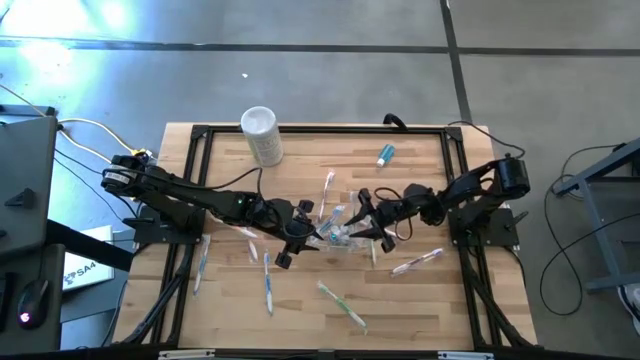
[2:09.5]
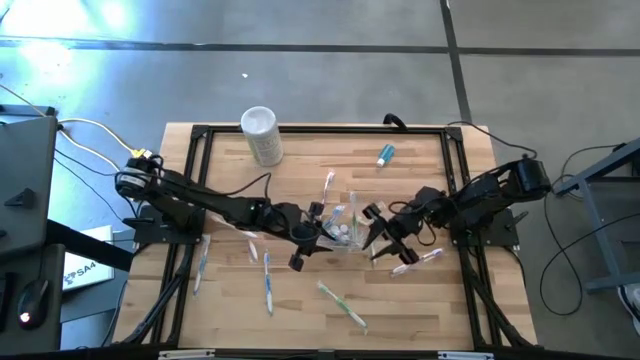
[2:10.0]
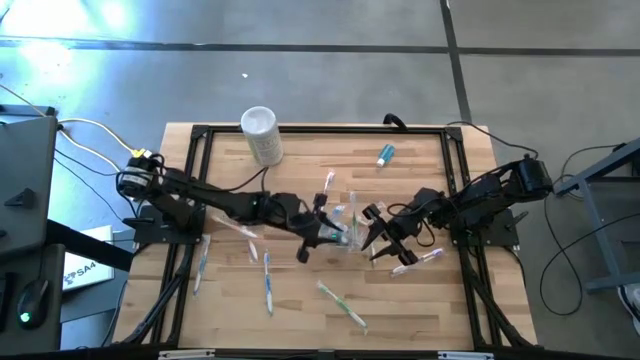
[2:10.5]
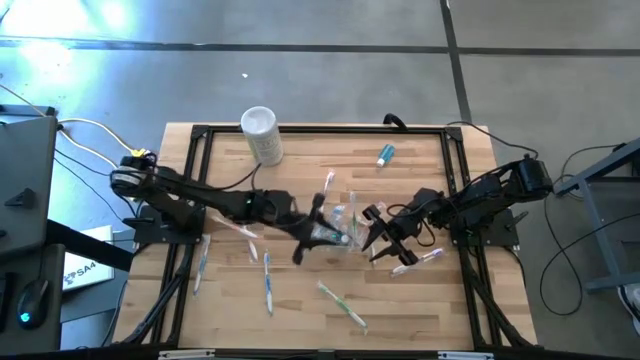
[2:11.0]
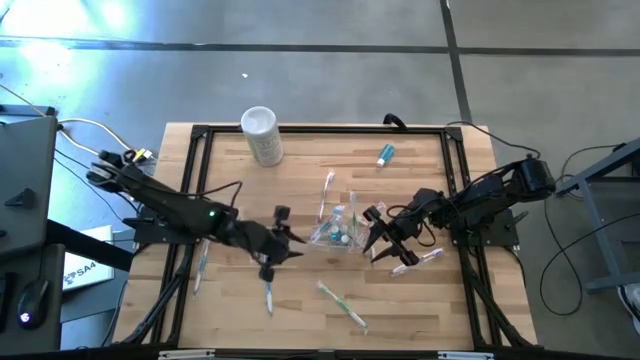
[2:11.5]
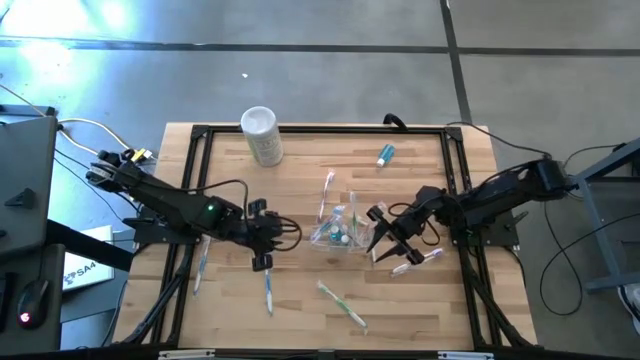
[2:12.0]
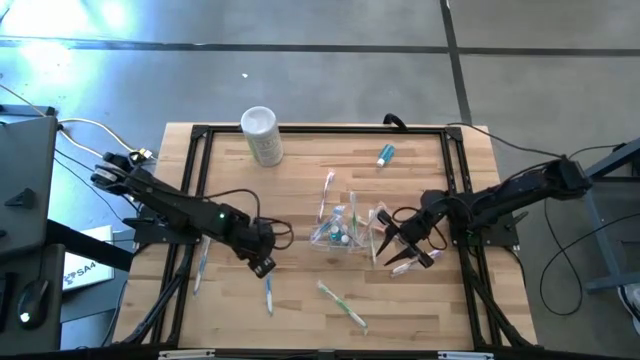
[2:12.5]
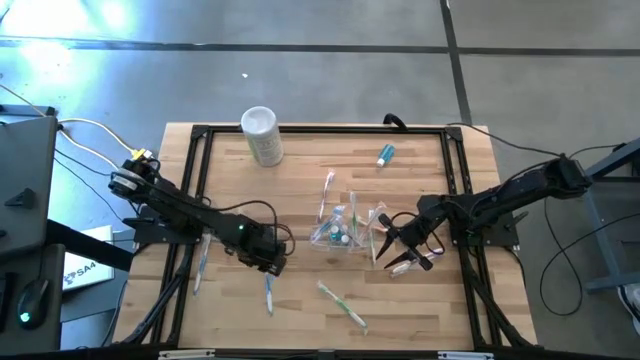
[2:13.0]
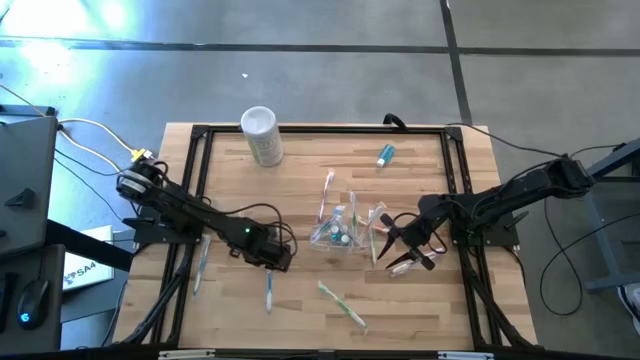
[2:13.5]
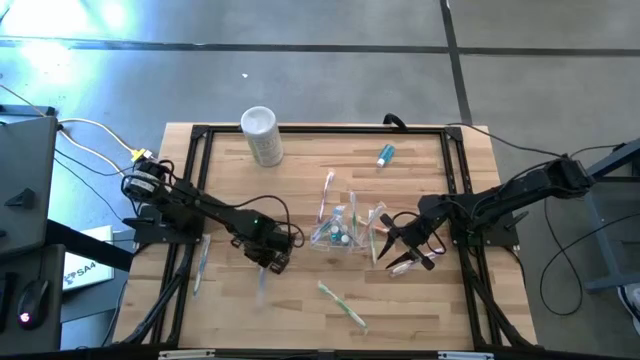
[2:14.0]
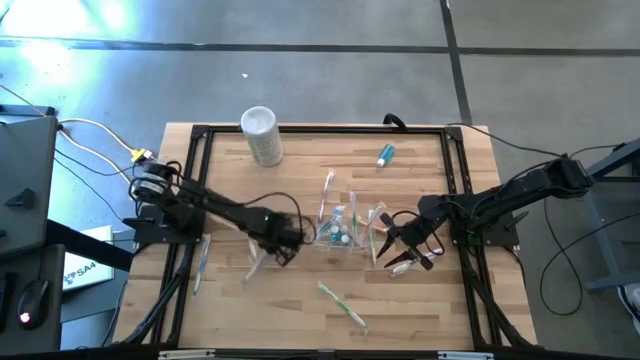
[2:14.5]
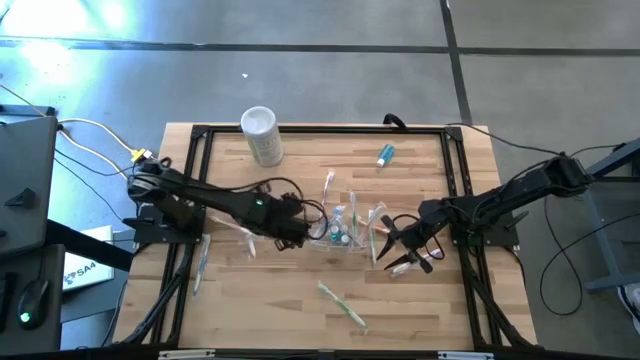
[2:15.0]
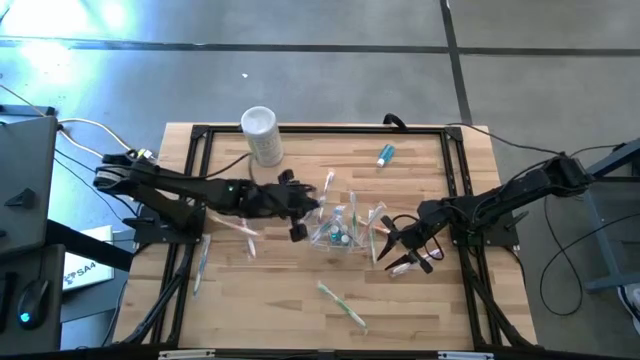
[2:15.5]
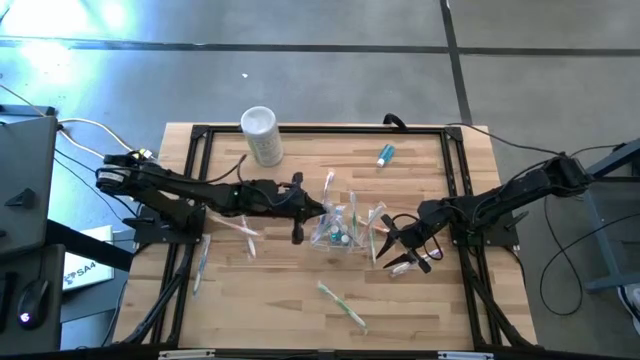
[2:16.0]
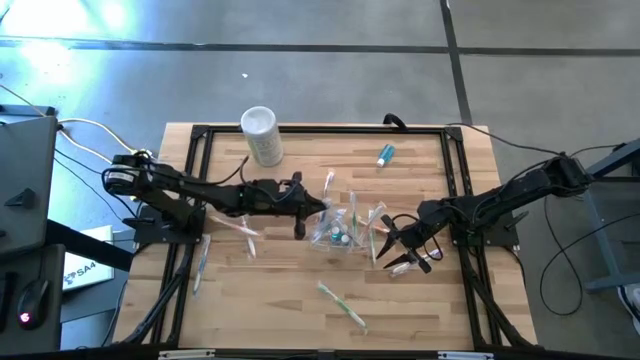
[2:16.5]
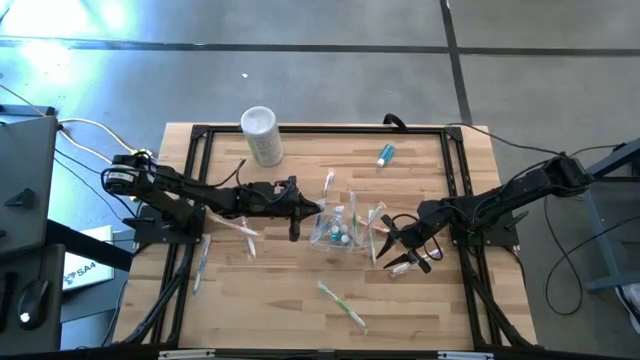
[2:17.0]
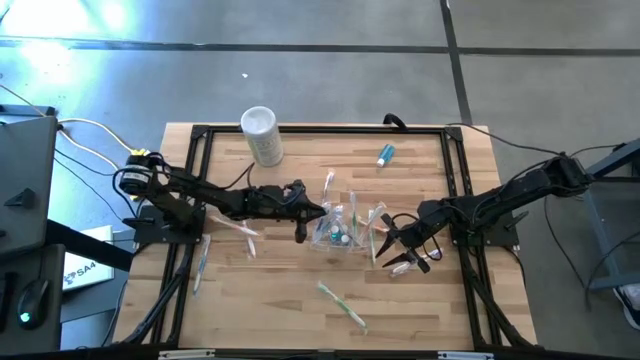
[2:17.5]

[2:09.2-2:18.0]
Task: Pick & Place toothbrushing station
Put the blue toothbrush into the left section of the transparent organizer

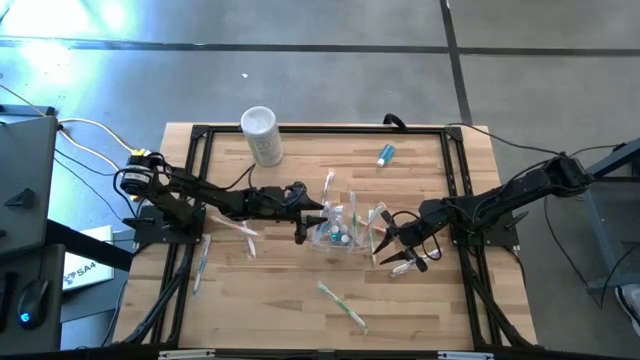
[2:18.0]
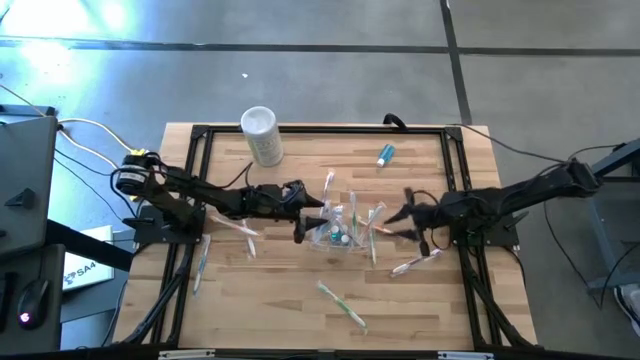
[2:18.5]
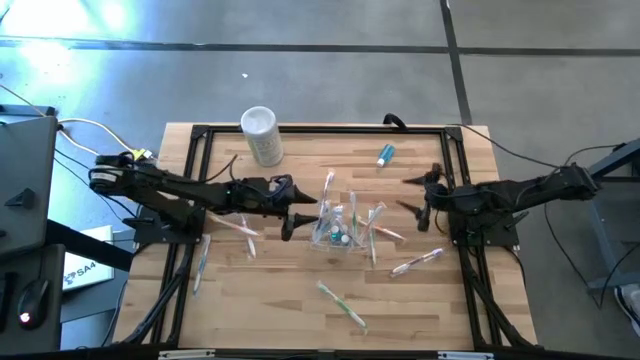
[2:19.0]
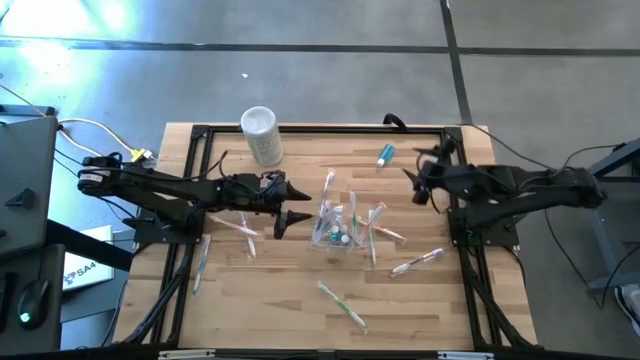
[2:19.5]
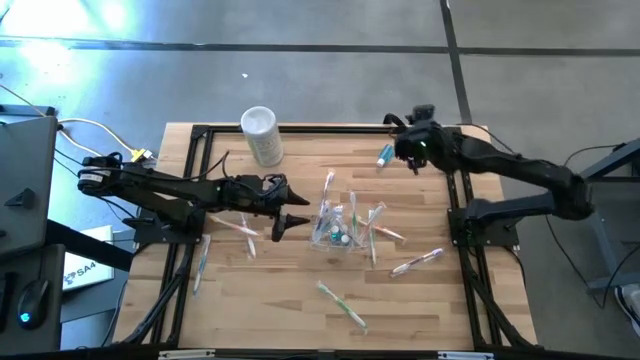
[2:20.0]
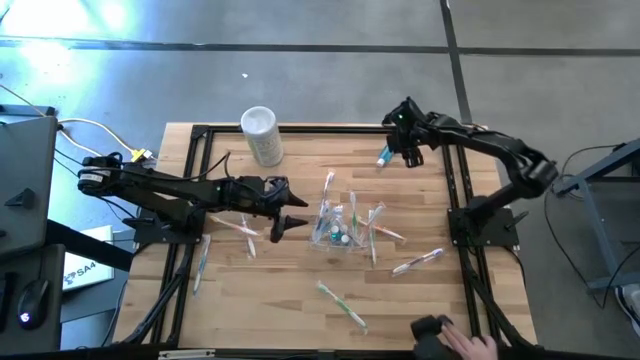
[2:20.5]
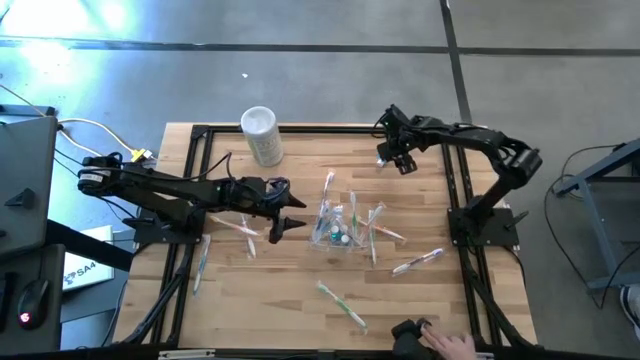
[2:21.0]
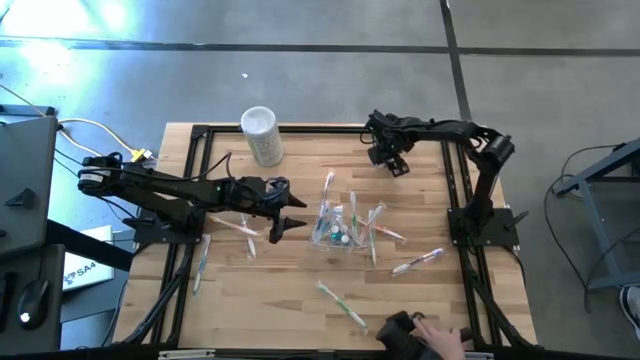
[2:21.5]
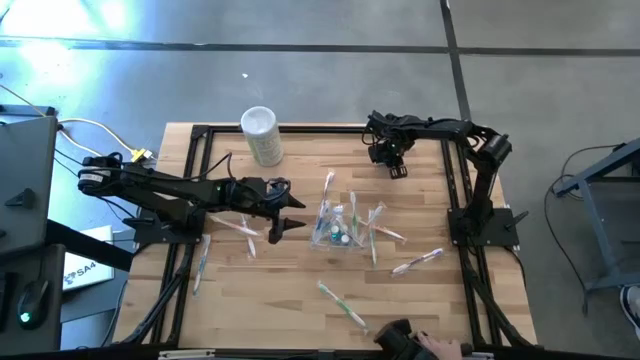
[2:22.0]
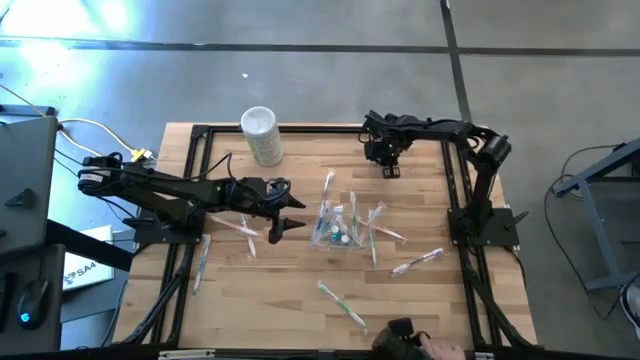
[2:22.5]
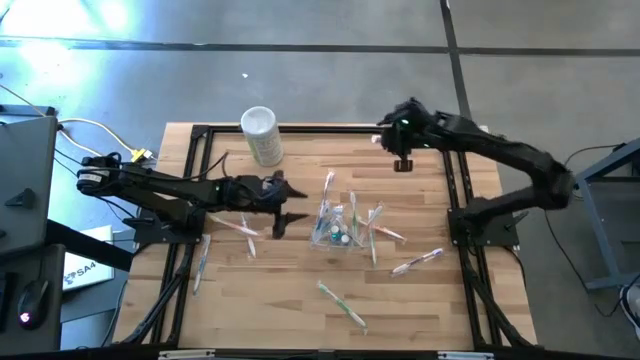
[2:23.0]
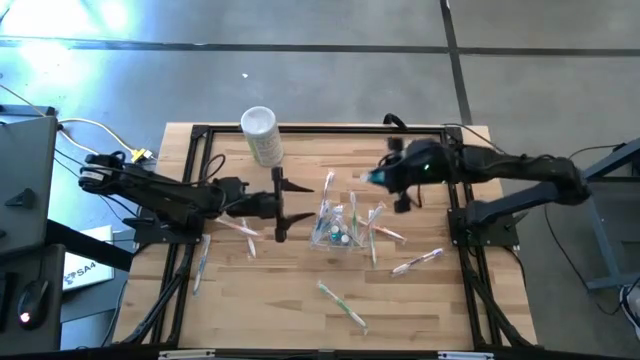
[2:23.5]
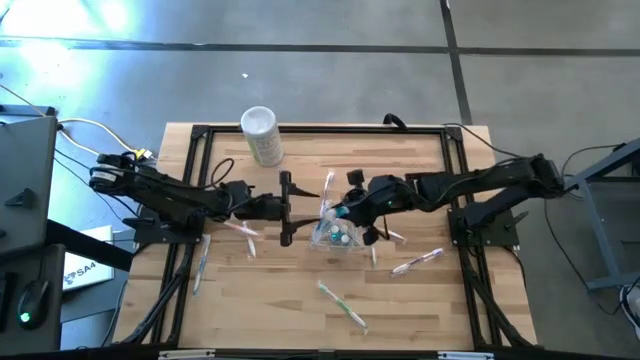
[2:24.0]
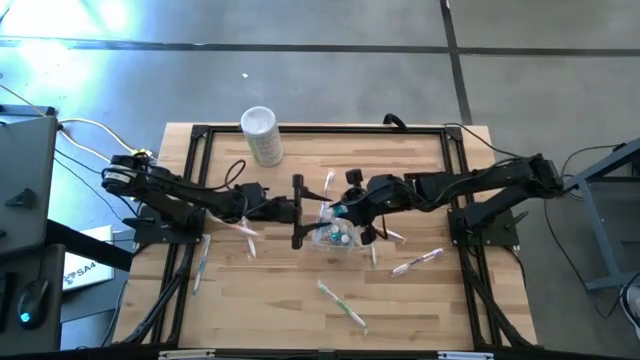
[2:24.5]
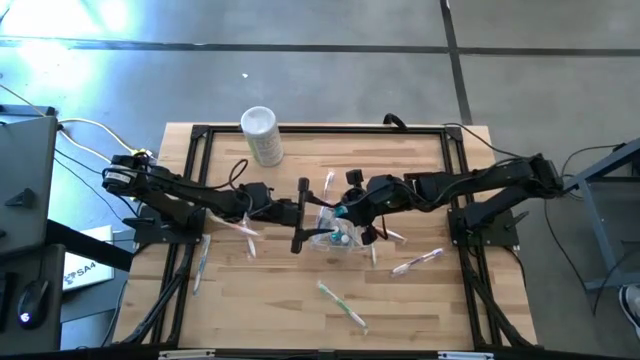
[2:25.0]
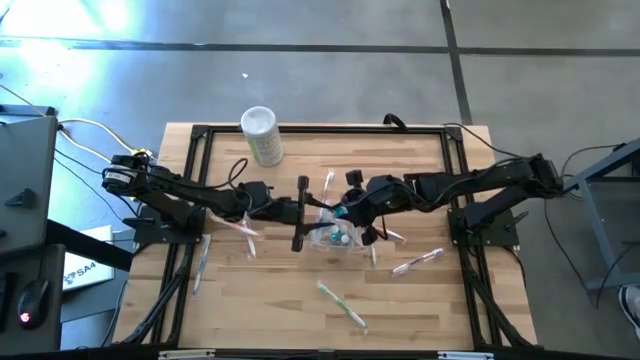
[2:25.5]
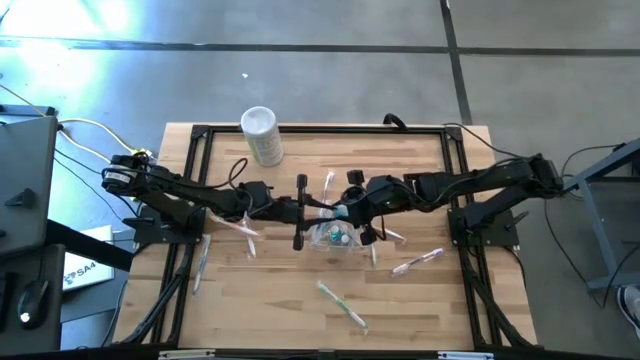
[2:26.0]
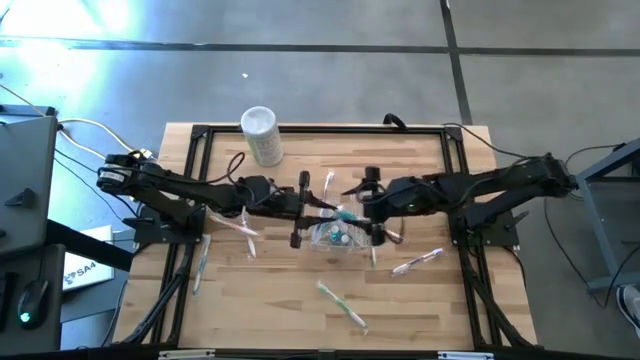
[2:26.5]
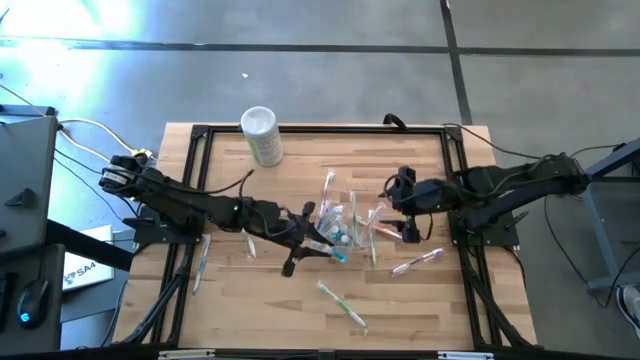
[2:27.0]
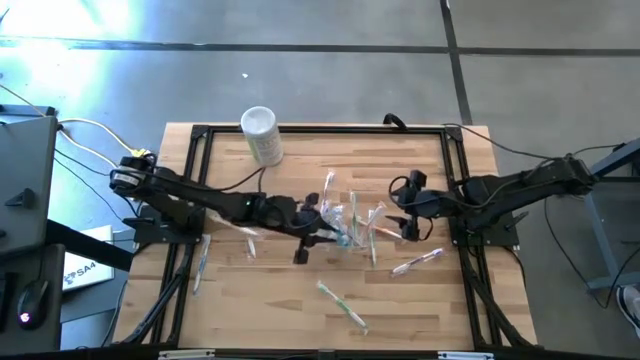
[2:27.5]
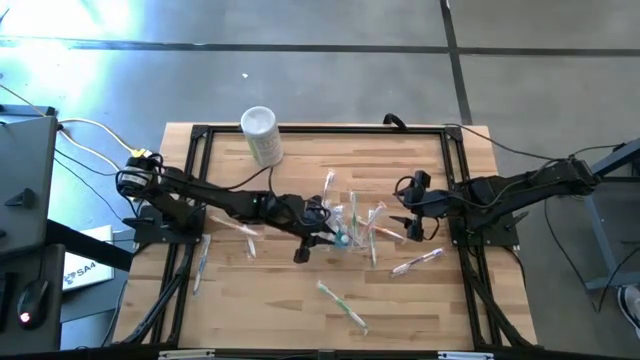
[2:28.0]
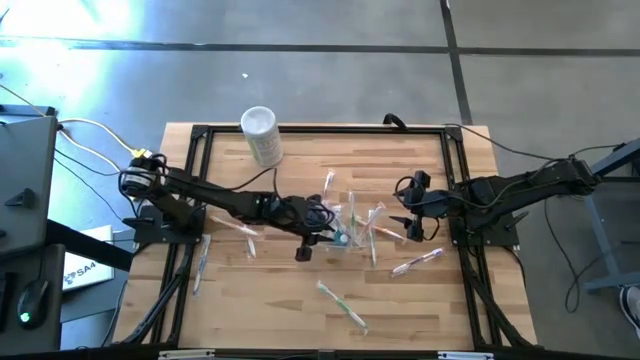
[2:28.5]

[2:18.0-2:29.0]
Put the blue mouthwash into the middle section of the transparent organizer

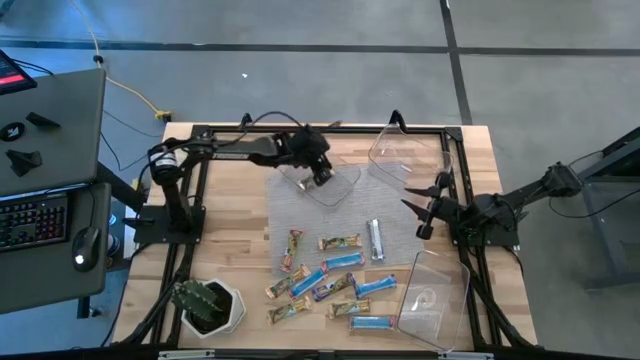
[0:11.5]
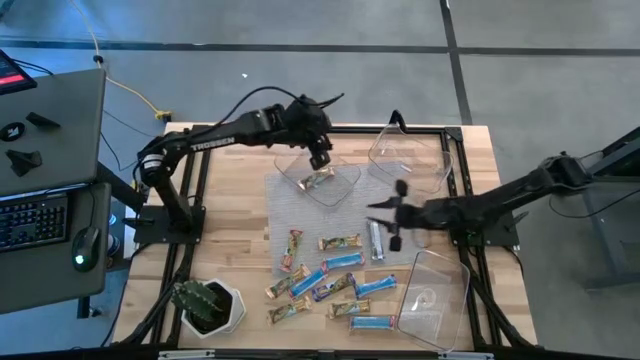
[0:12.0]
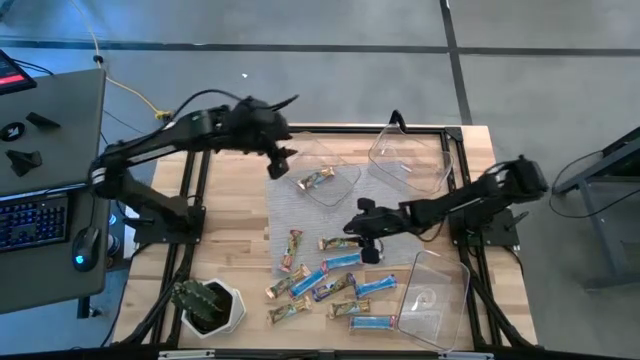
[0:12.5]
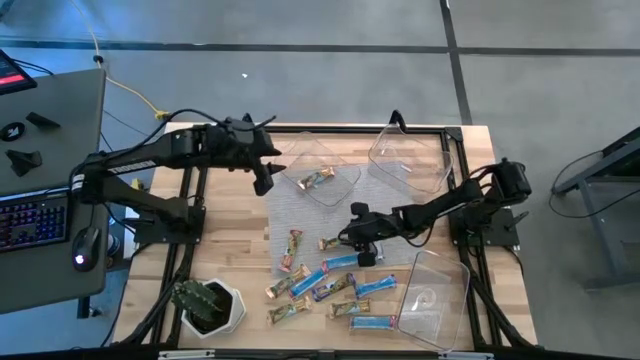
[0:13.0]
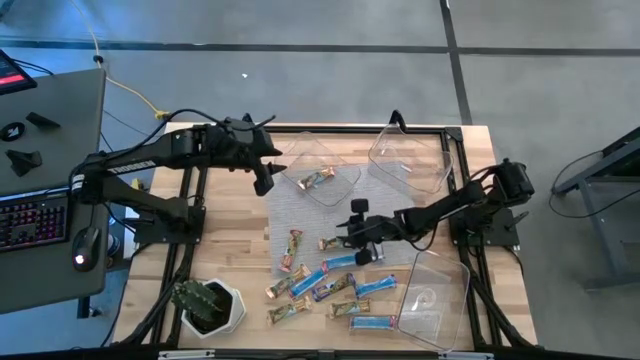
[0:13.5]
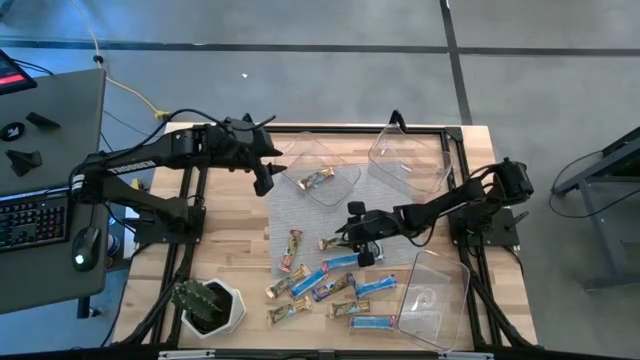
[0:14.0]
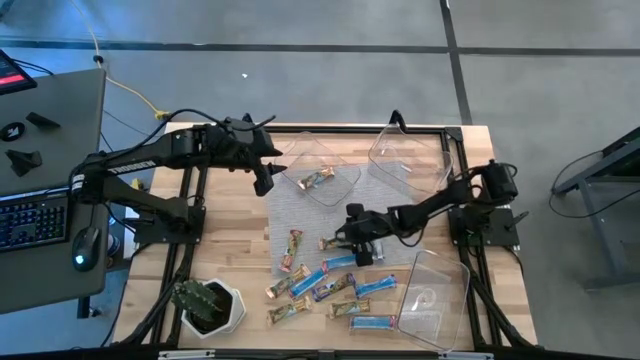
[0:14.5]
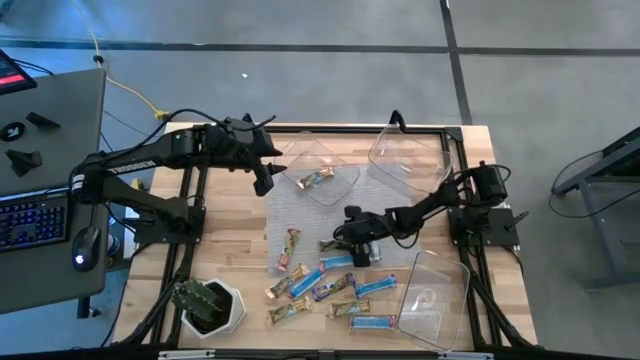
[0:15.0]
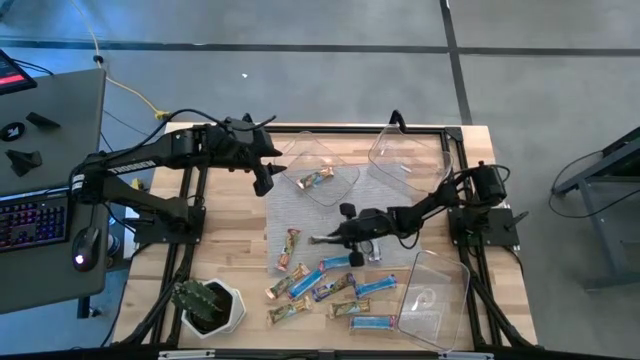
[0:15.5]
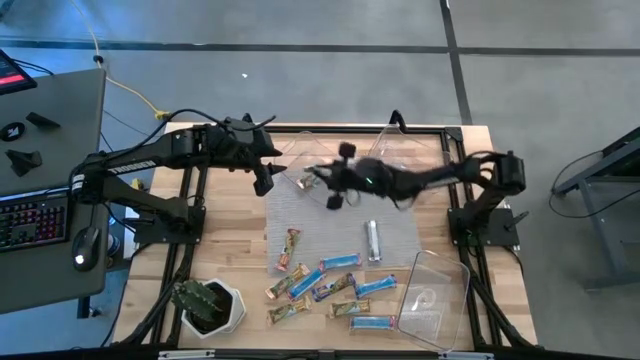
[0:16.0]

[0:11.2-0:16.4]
Task: Pick and place Granola Bars by type
Put the yellow granola bar into the top middle transparent bin
